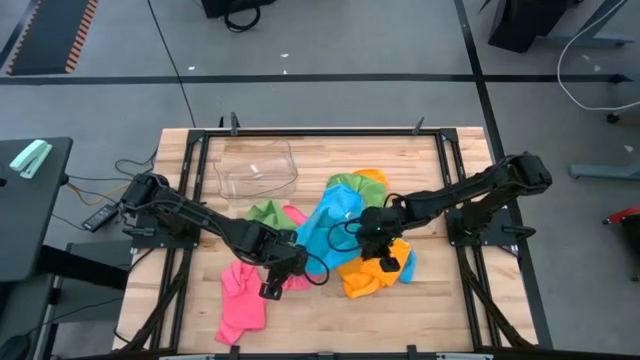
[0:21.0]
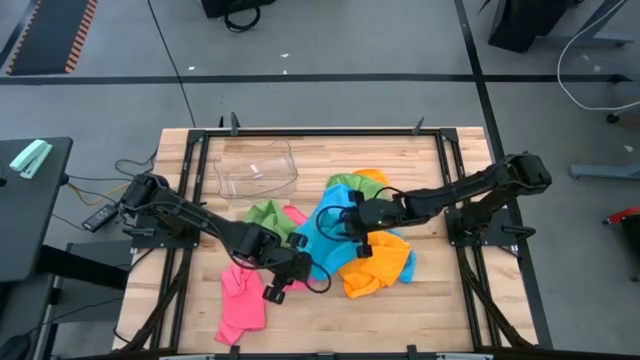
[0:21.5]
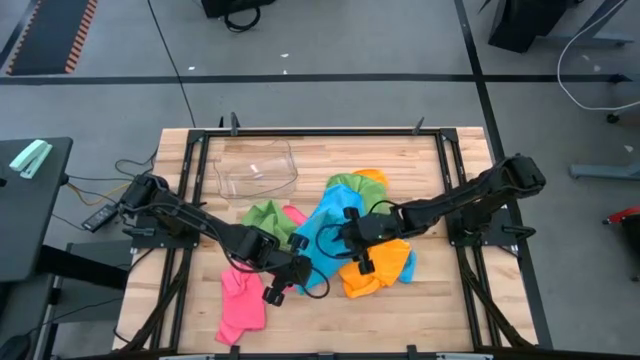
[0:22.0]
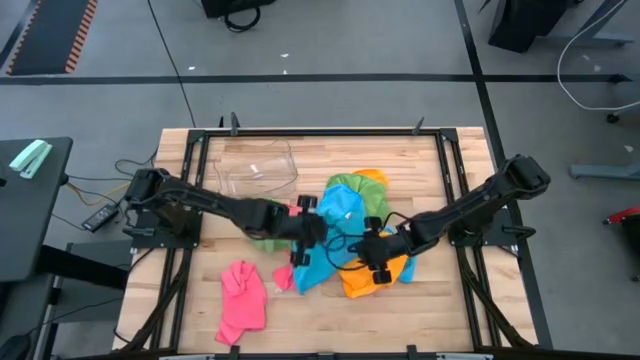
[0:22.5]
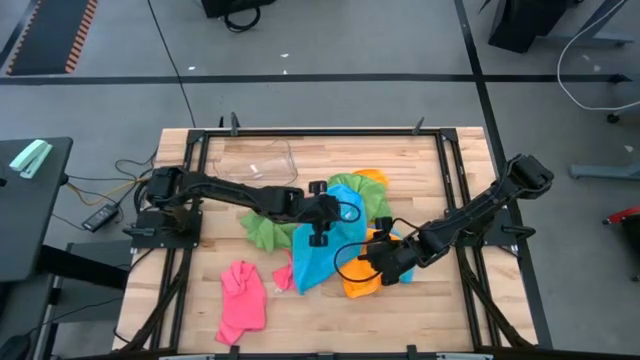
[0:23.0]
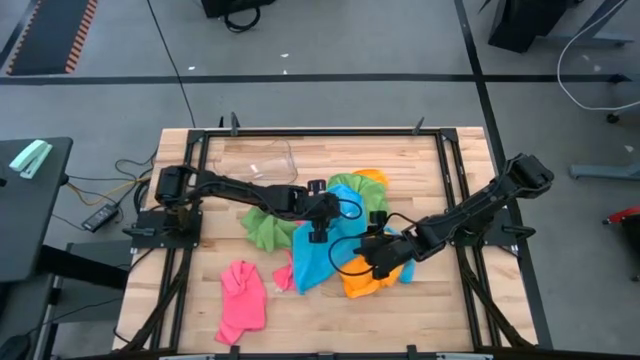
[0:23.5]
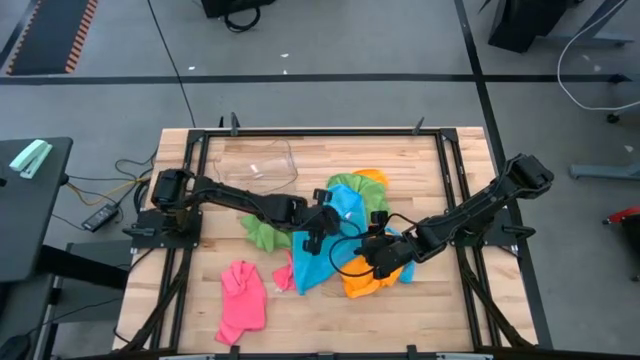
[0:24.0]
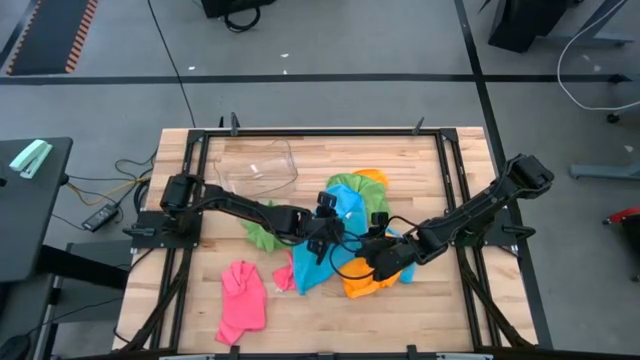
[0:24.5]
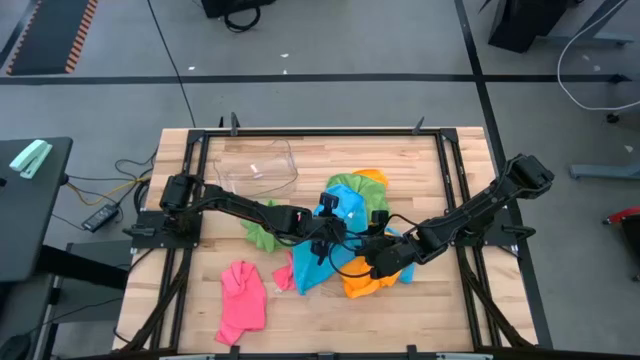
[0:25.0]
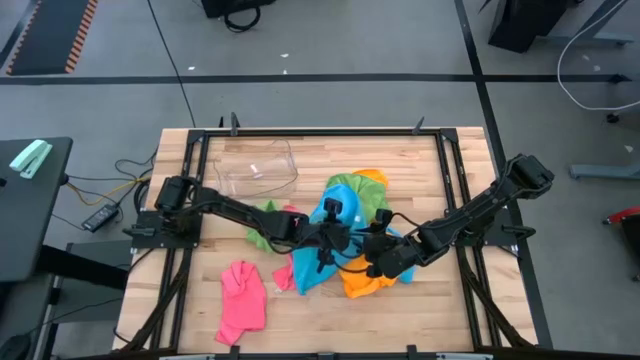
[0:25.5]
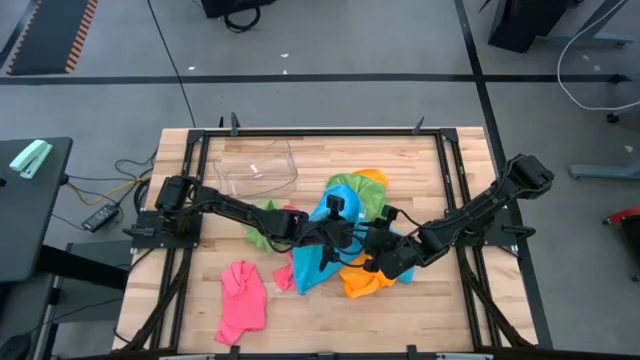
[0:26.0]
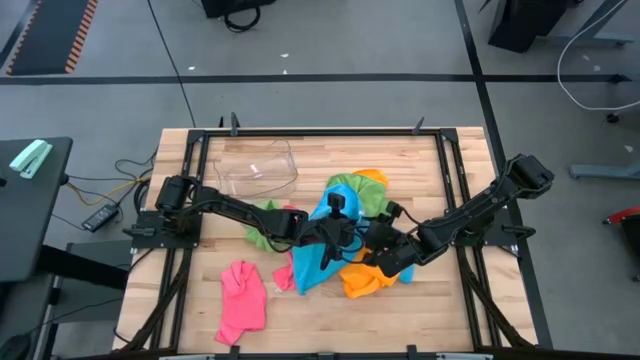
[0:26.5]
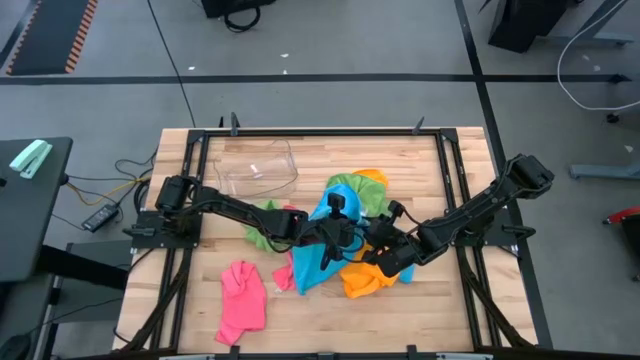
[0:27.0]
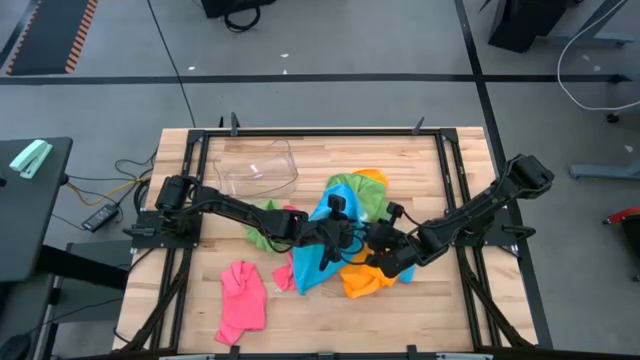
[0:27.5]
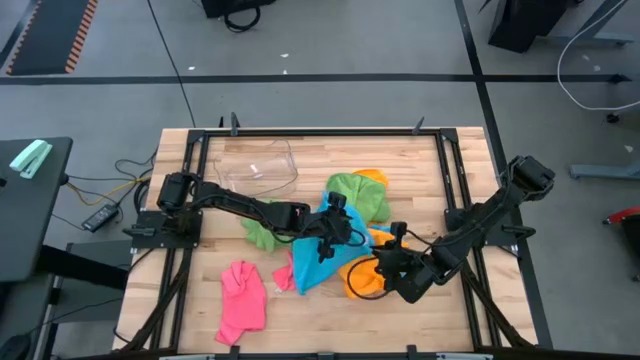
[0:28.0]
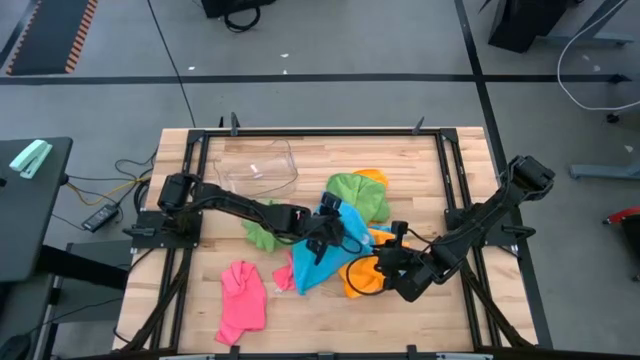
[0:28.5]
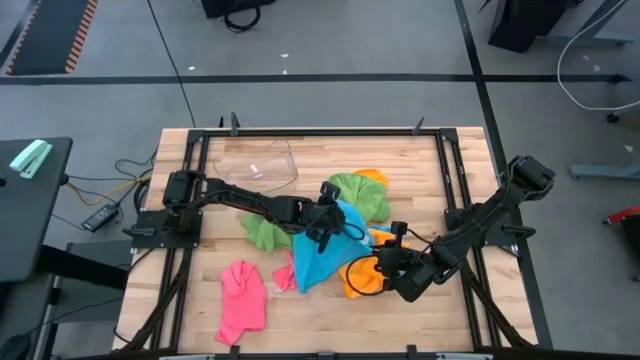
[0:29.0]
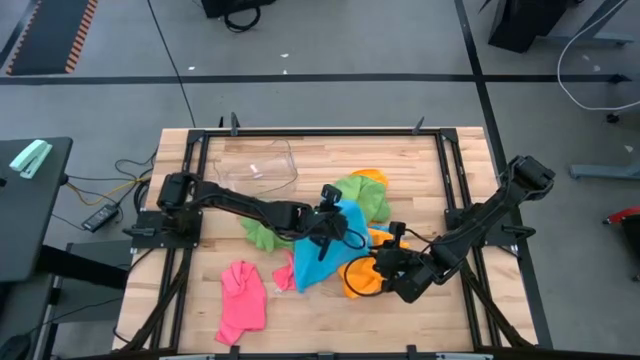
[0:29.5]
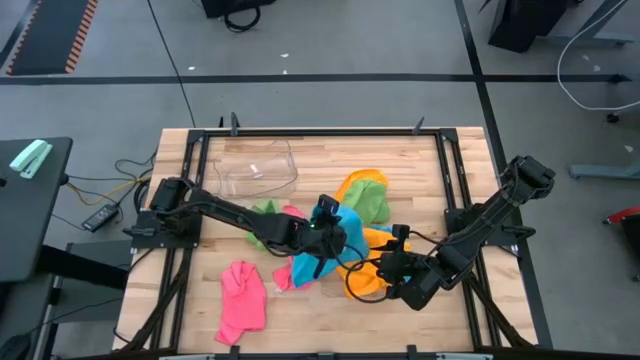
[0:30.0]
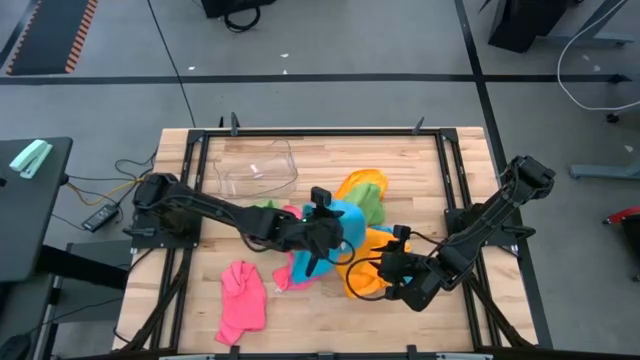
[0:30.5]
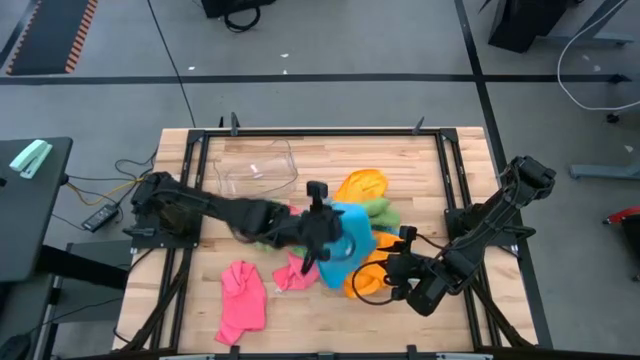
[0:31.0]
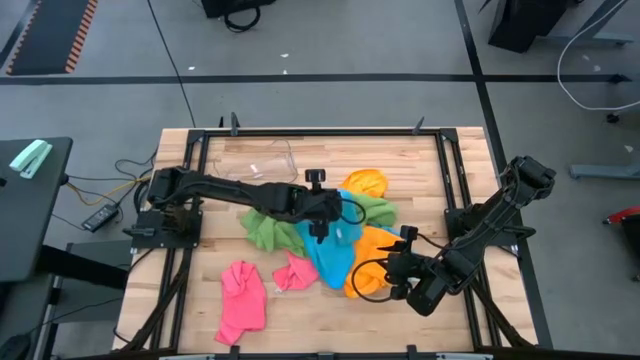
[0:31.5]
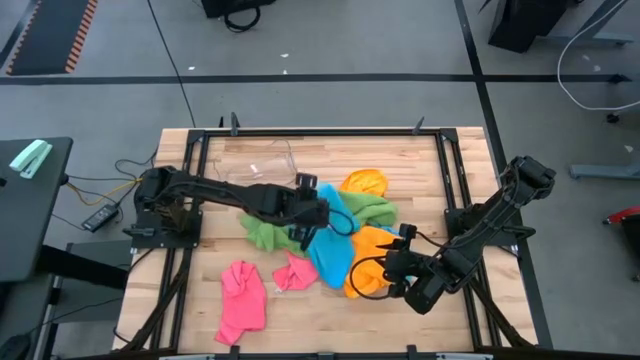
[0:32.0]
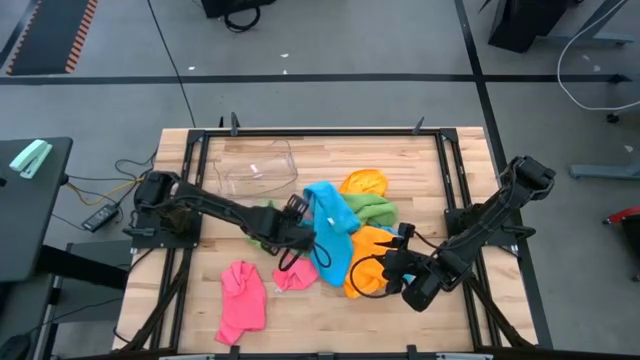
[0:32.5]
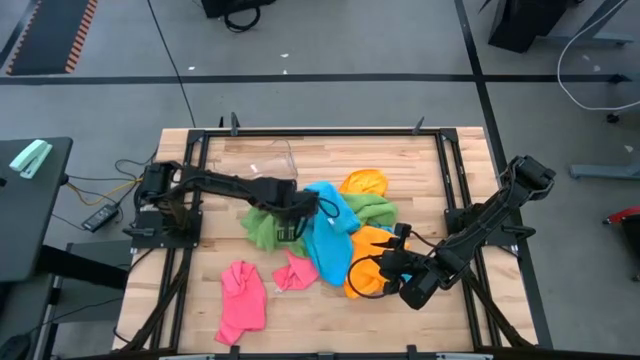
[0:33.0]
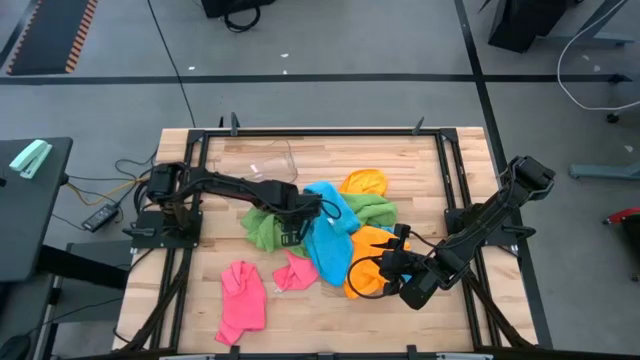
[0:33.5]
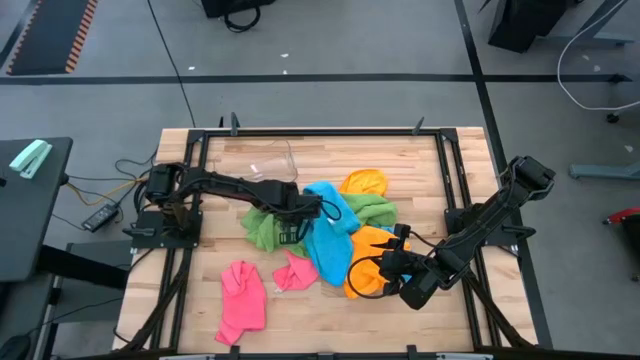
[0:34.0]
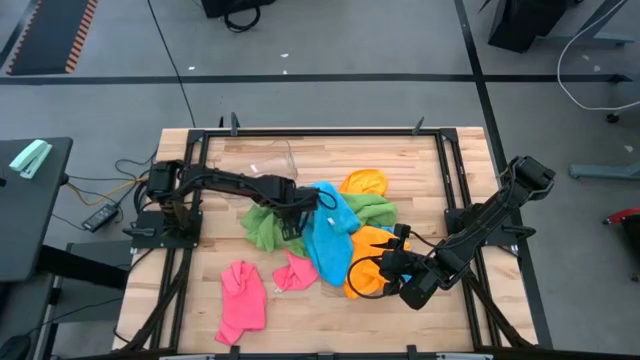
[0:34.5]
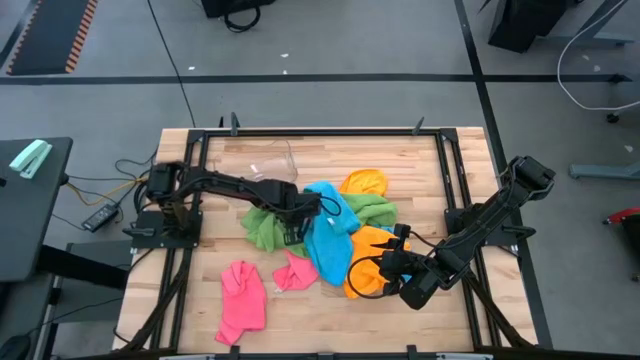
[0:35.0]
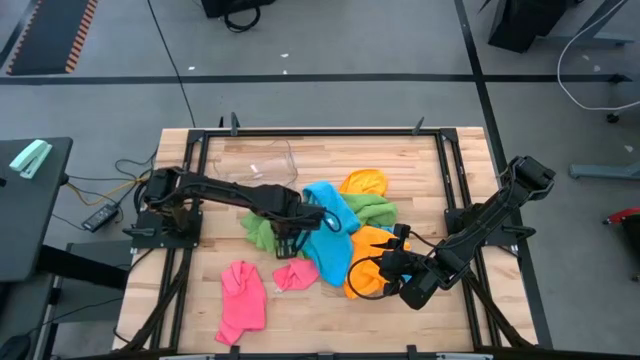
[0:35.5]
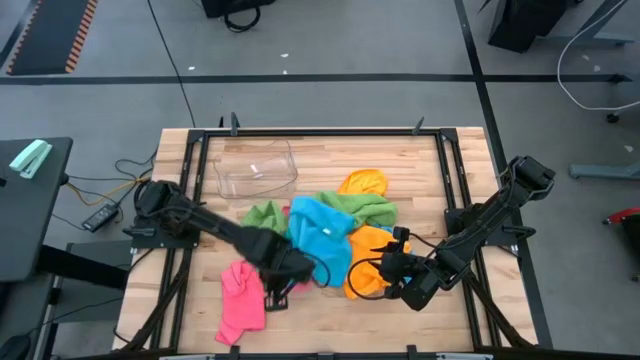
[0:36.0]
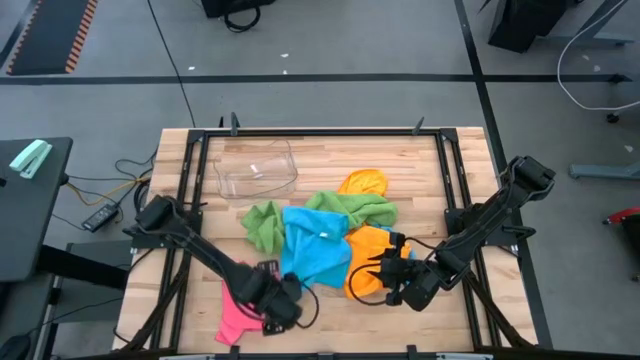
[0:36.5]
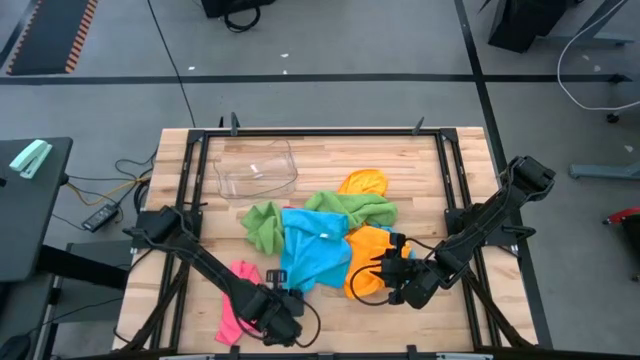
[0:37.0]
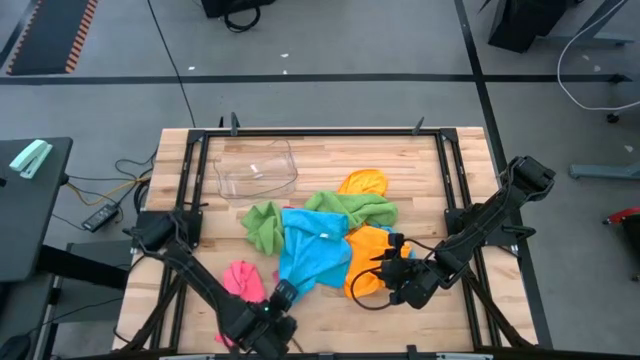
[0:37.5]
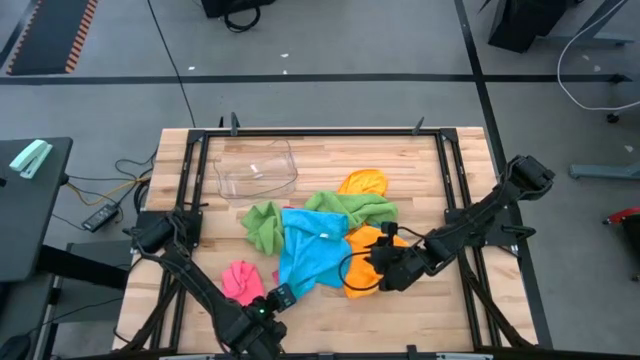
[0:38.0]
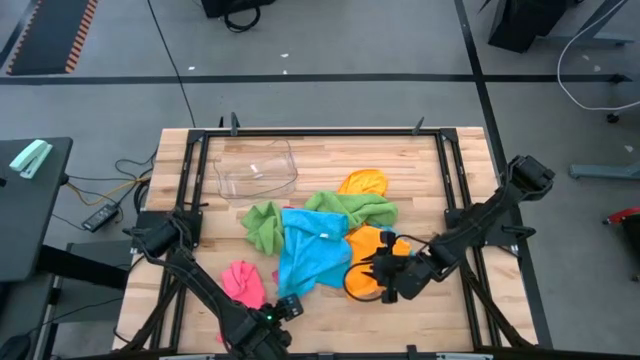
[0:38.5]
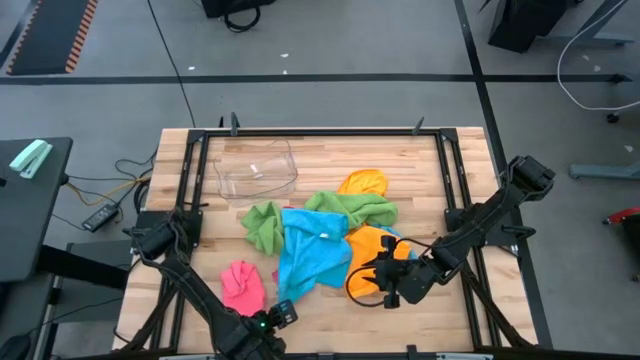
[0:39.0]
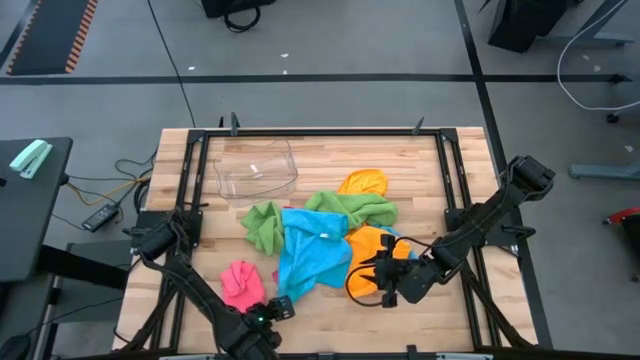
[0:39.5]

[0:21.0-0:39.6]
Task: Fold microfiber towels
Fold the left blue microfiber towel

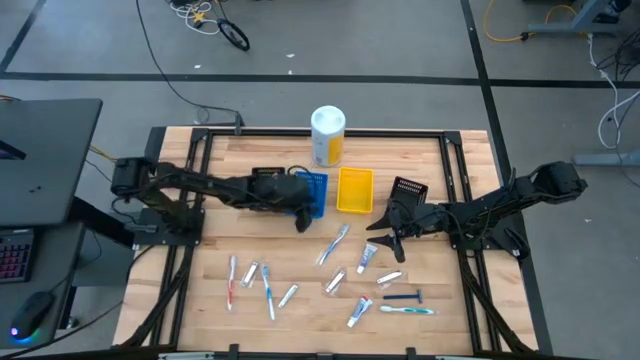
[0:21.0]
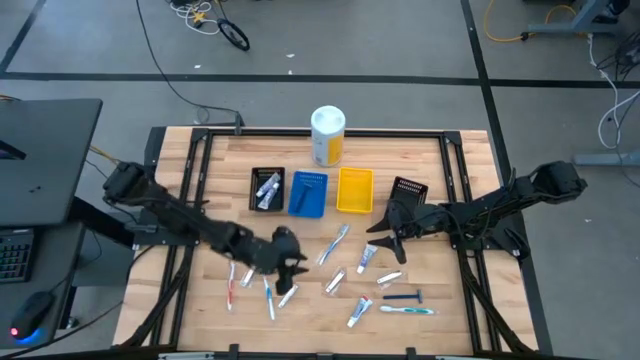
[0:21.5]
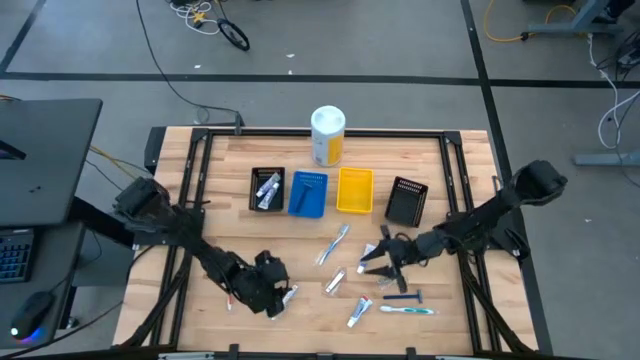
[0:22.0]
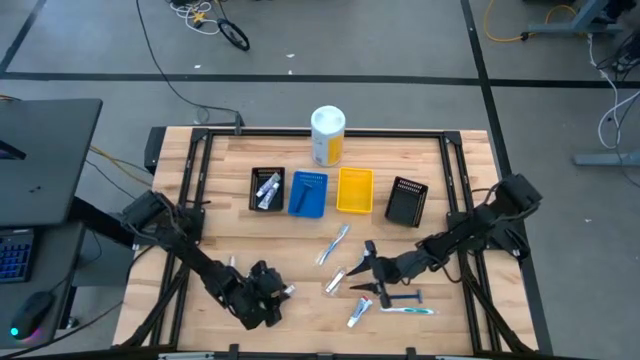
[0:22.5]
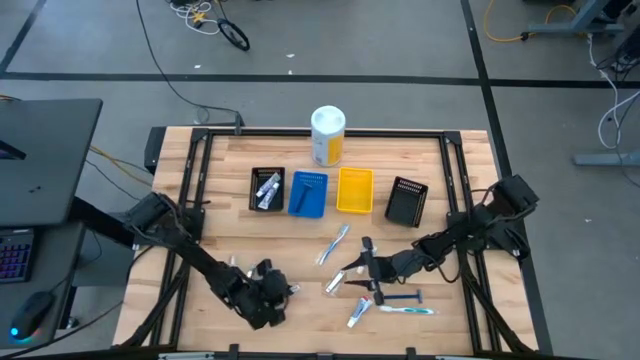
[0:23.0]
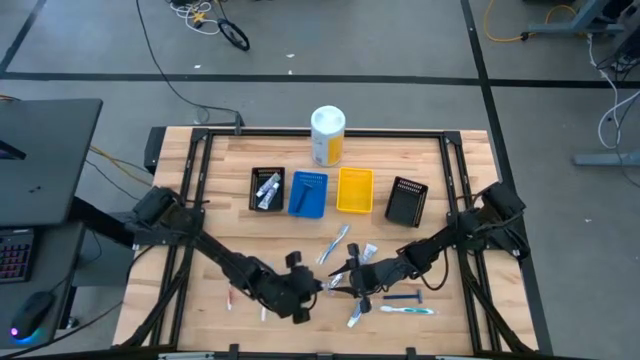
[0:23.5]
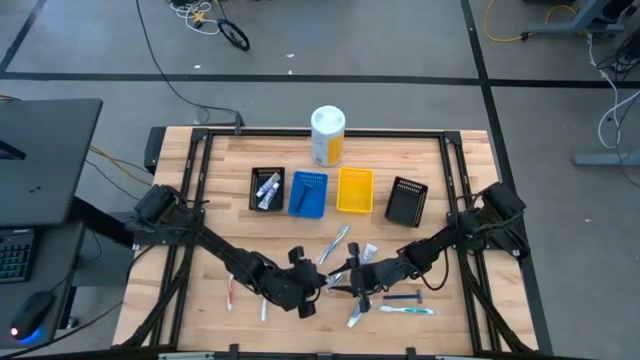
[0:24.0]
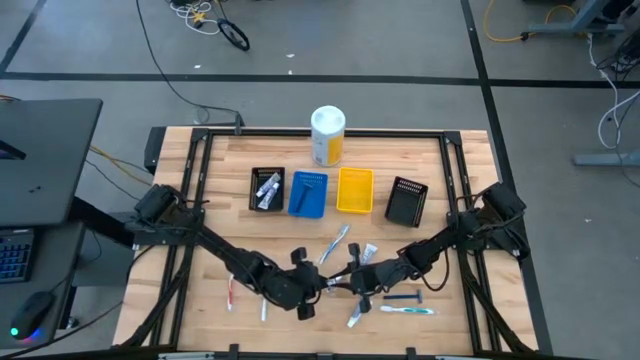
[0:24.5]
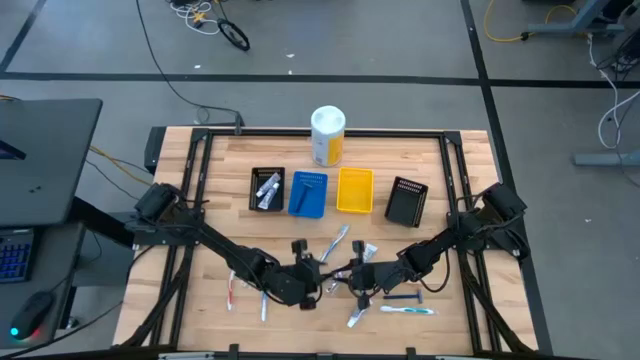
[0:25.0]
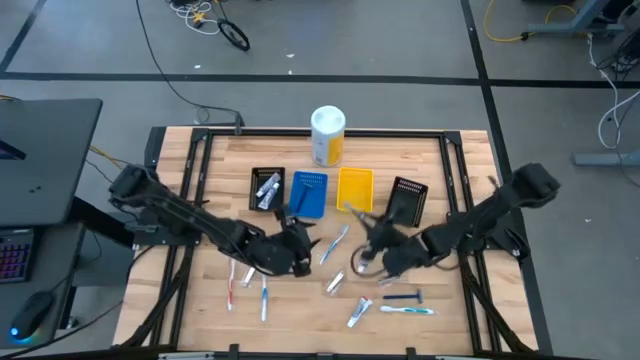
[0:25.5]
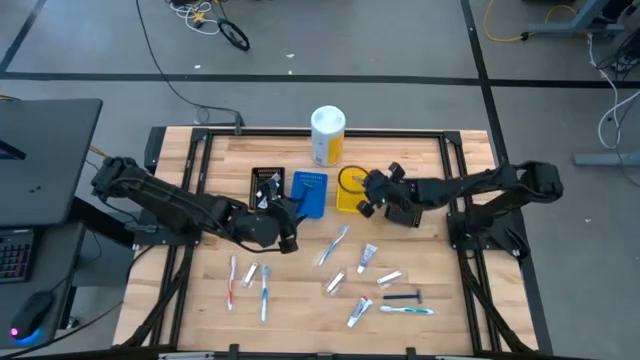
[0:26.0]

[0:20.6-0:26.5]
Task: Pick & Place Travel size toiletries
Put the nail cutter into the yellow bin
